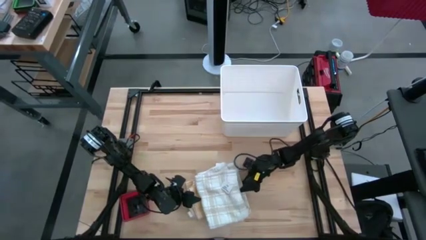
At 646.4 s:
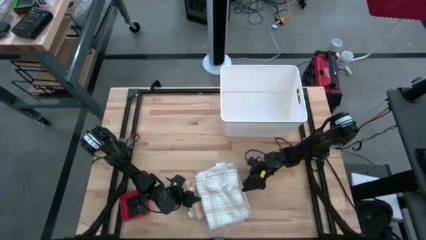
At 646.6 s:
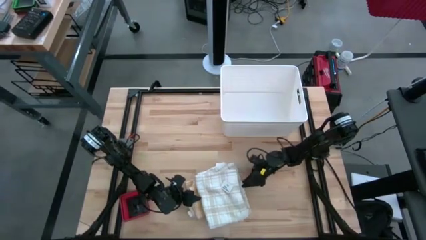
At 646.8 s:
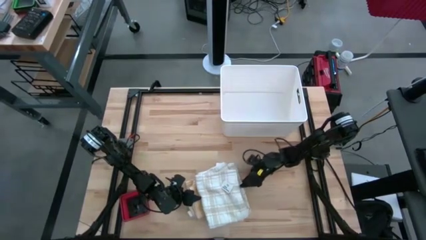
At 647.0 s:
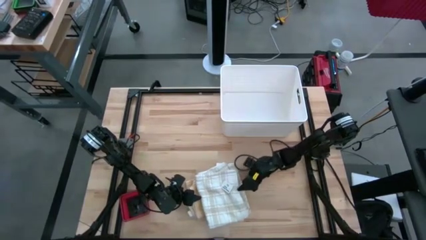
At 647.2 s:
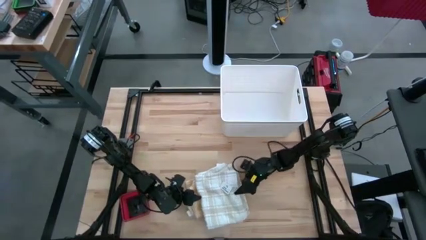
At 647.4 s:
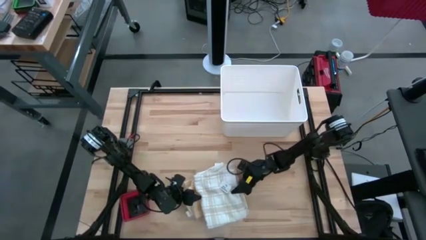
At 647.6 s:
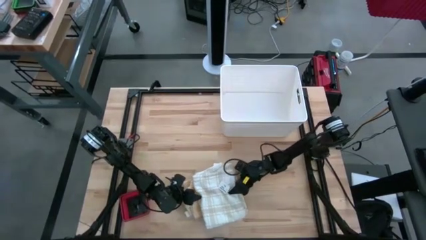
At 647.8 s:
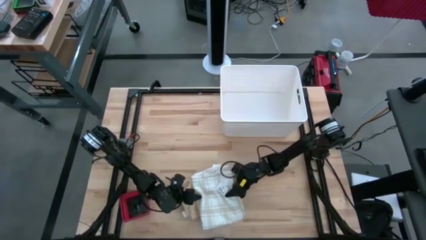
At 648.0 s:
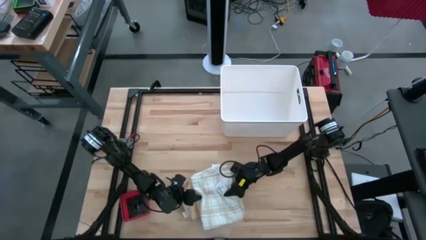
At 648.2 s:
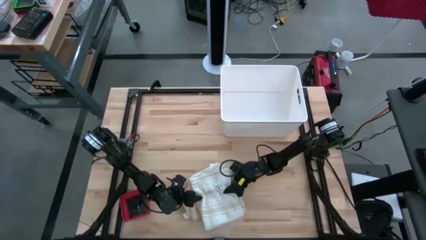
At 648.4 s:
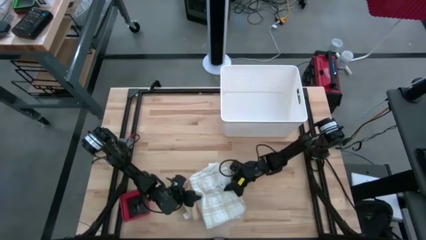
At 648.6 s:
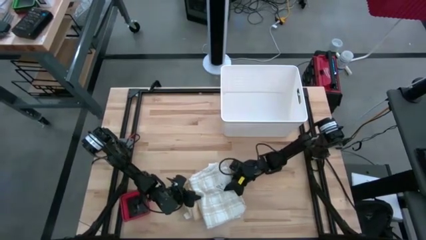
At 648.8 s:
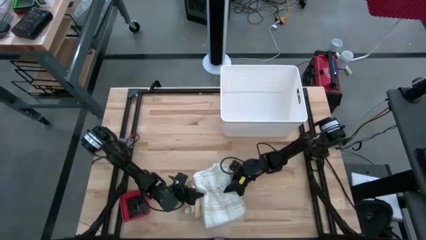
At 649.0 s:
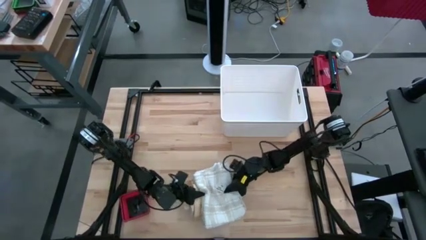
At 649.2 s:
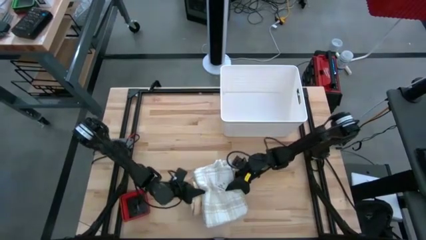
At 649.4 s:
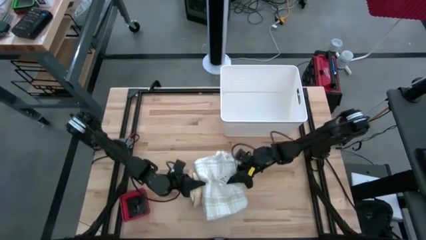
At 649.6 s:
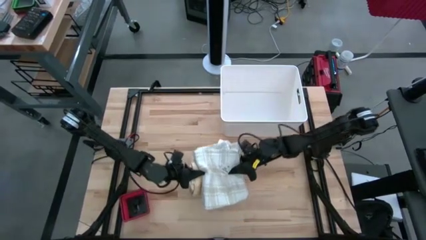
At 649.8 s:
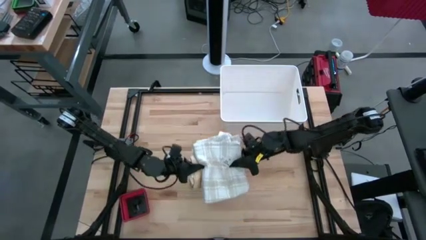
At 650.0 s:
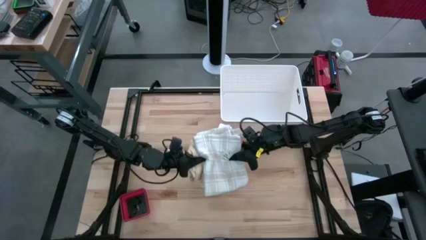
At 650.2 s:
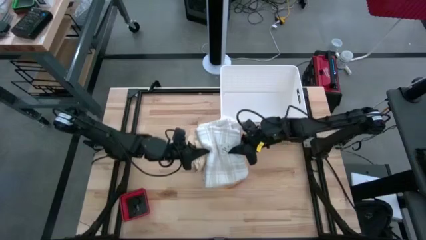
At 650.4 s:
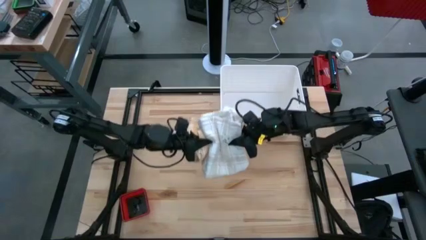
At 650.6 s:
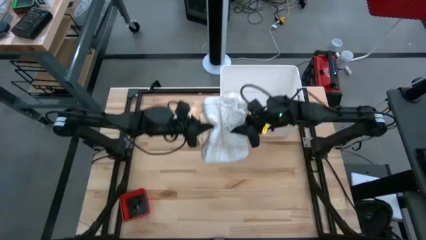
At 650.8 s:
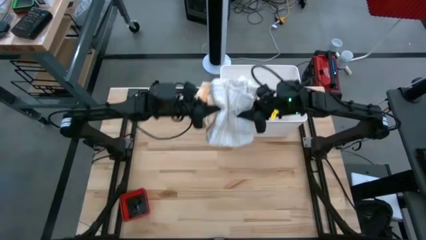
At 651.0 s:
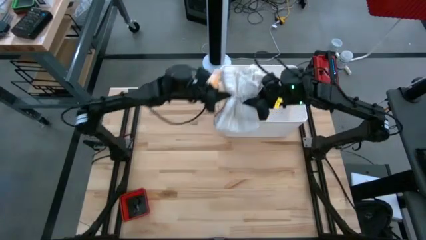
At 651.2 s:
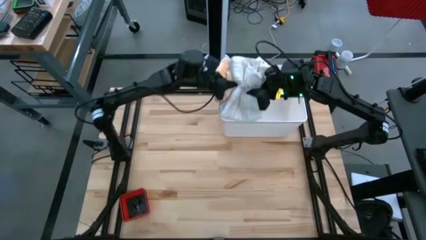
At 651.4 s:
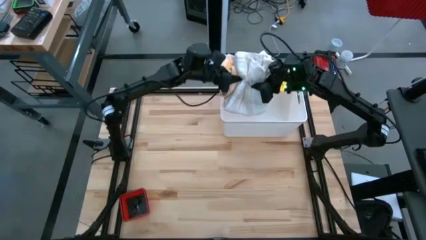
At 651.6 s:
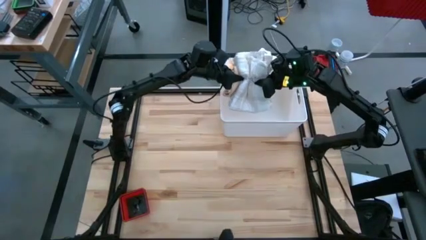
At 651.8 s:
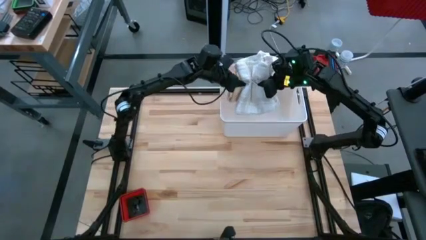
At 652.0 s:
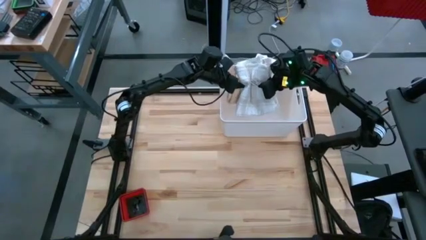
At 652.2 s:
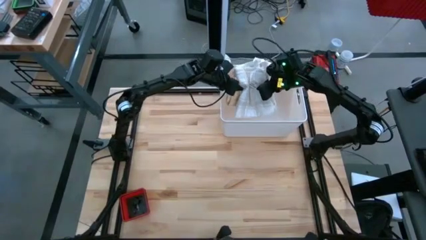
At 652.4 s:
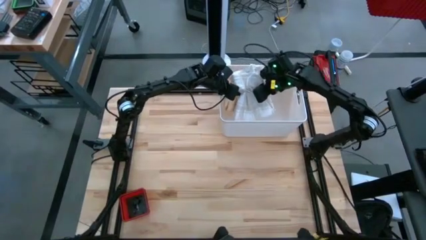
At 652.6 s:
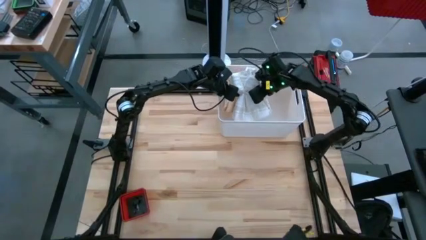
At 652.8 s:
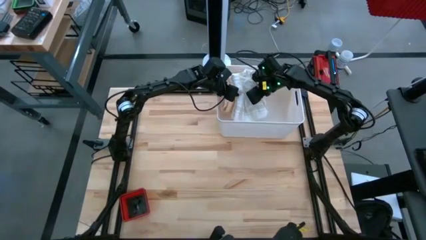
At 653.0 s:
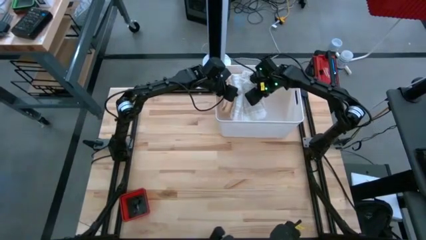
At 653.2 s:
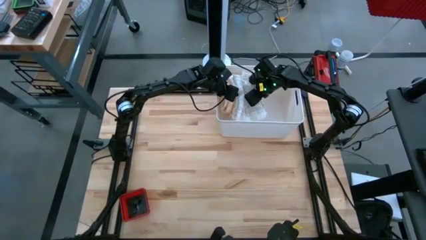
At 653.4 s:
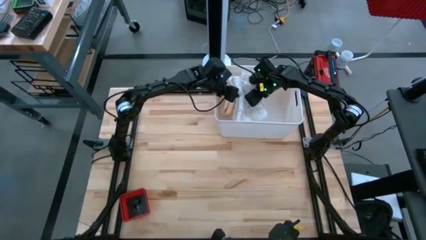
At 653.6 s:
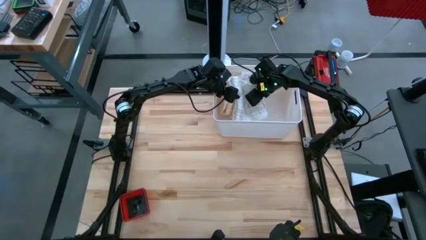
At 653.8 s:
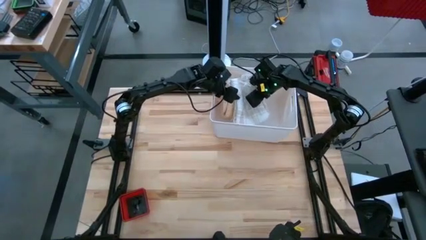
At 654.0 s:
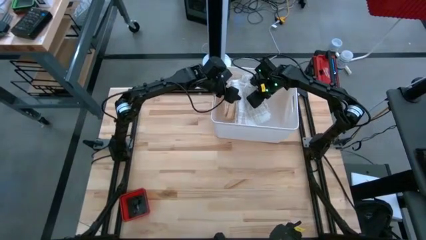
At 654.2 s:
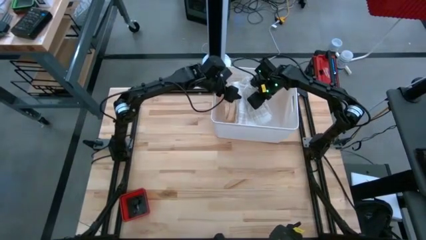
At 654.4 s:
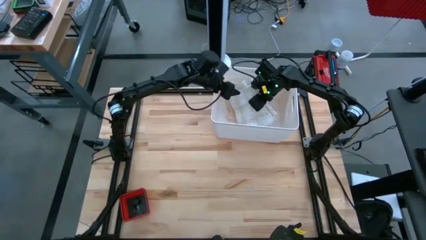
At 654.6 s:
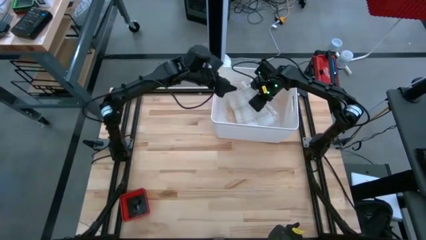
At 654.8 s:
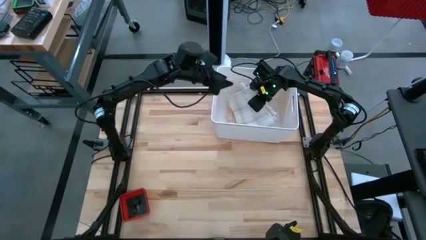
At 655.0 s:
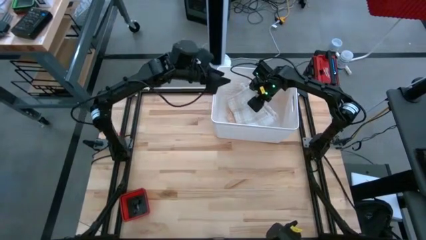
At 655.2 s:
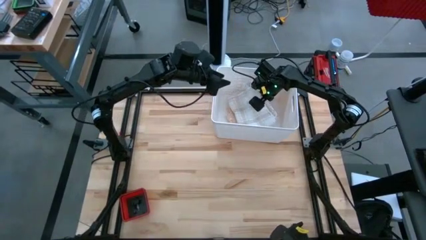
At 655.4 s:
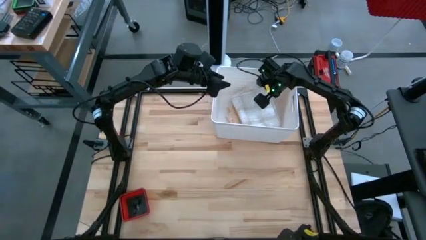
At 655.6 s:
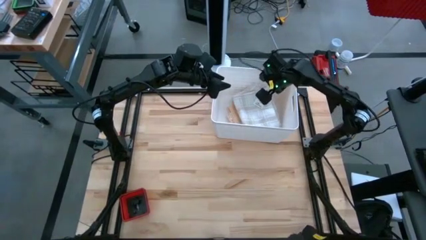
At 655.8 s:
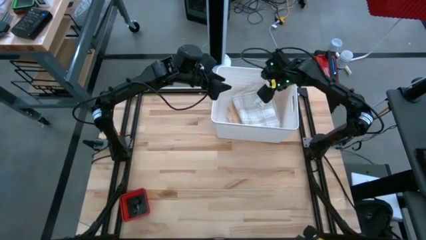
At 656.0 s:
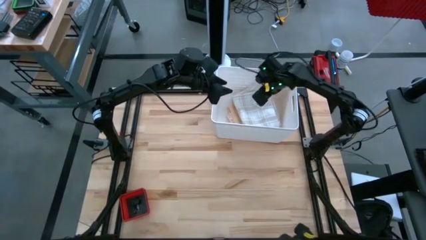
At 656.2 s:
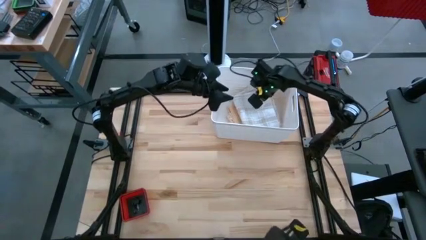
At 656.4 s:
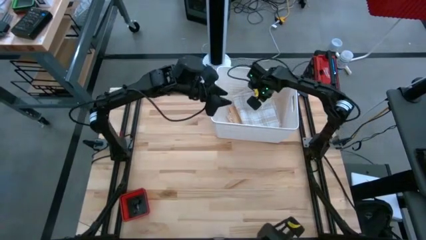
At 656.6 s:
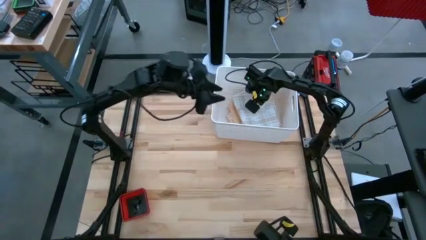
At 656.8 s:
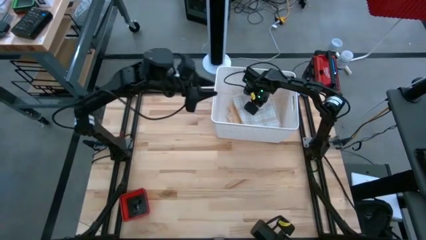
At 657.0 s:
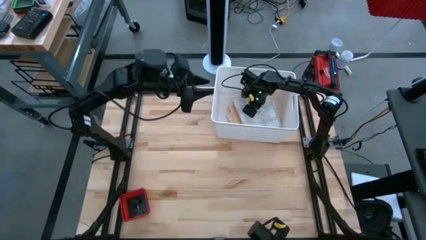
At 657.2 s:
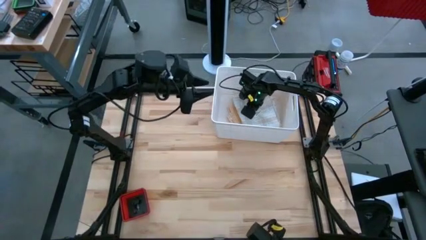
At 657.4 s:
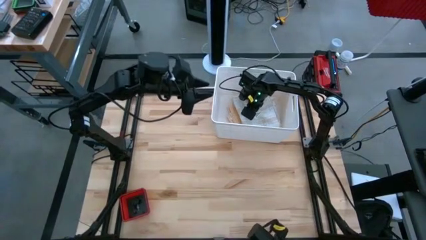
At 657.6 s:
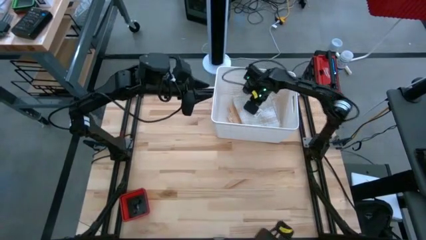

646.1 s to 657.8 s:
Task: Fold towel
Put the stack of folded kitchen towels into the white laundry bin

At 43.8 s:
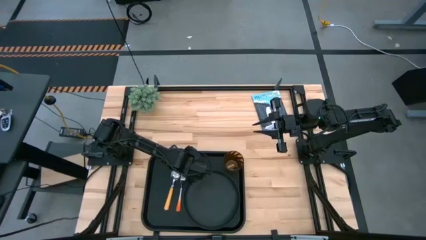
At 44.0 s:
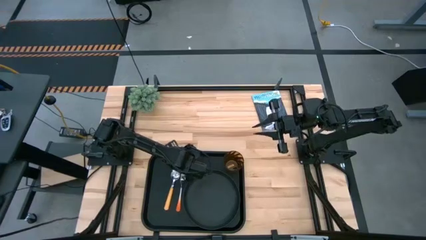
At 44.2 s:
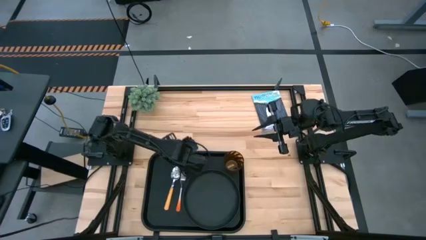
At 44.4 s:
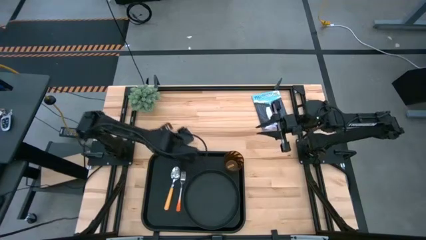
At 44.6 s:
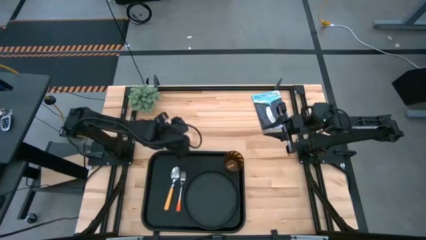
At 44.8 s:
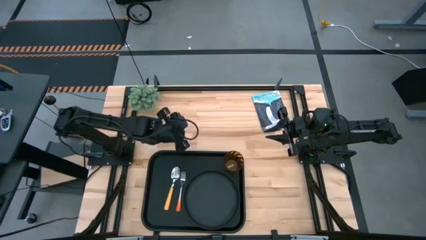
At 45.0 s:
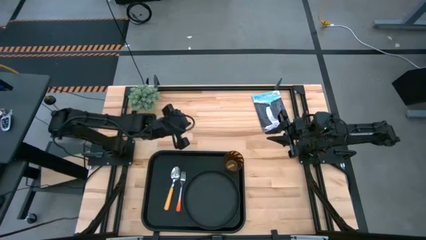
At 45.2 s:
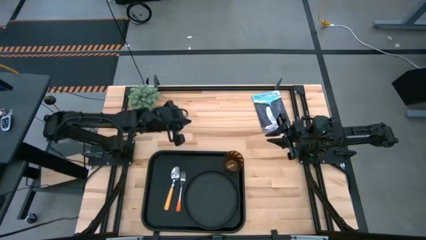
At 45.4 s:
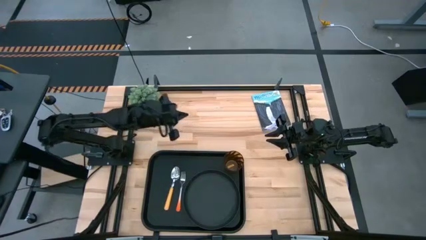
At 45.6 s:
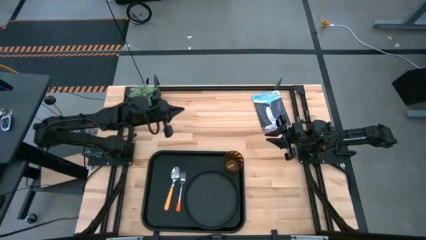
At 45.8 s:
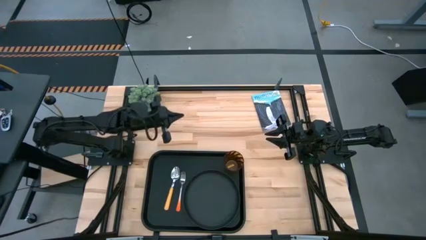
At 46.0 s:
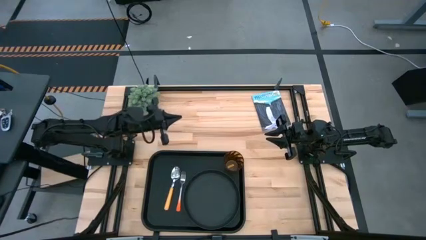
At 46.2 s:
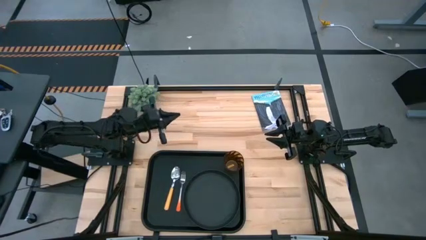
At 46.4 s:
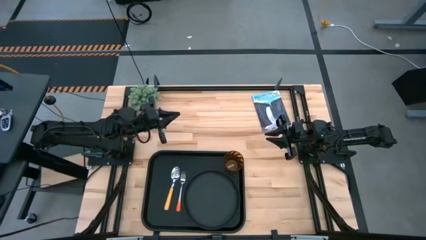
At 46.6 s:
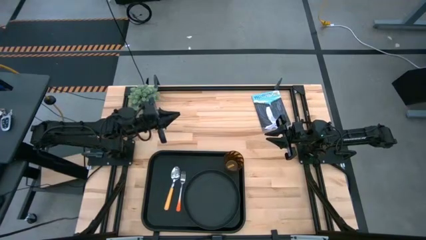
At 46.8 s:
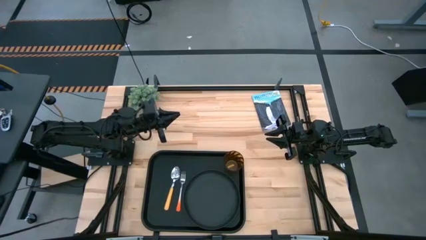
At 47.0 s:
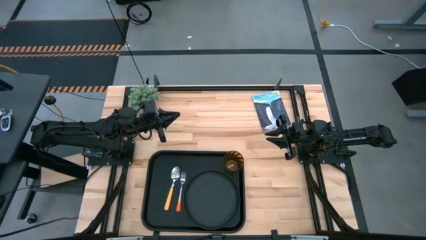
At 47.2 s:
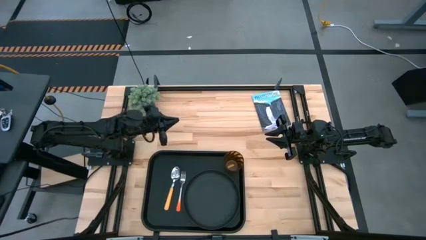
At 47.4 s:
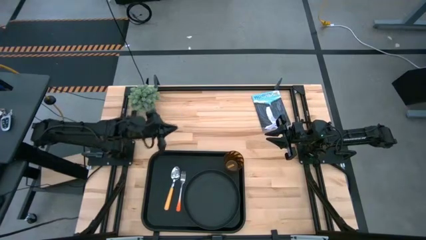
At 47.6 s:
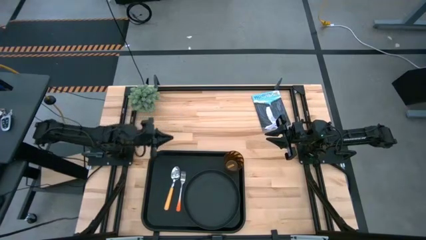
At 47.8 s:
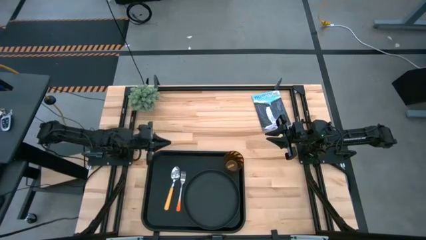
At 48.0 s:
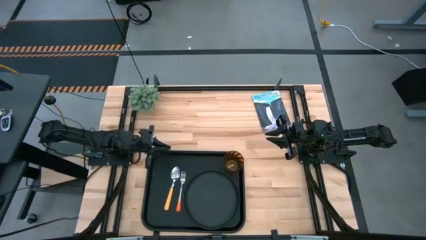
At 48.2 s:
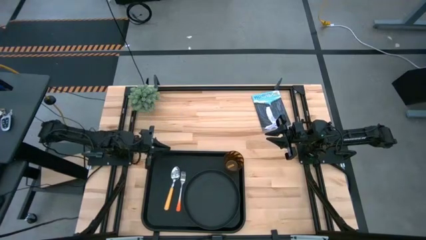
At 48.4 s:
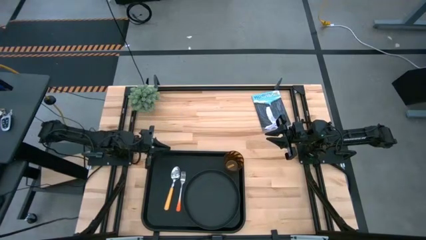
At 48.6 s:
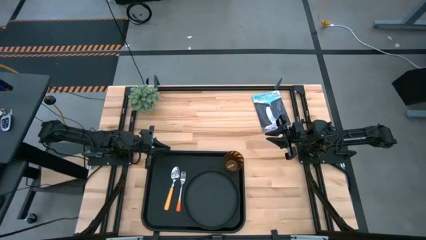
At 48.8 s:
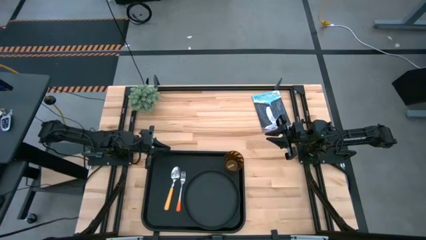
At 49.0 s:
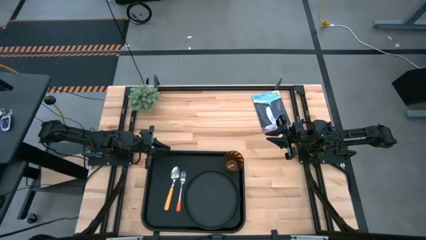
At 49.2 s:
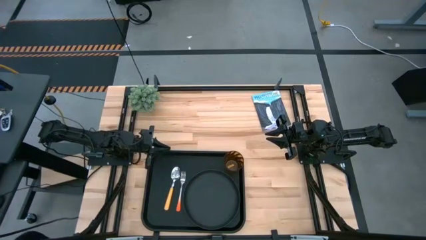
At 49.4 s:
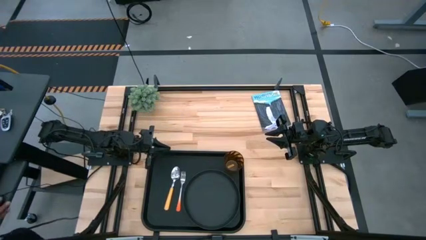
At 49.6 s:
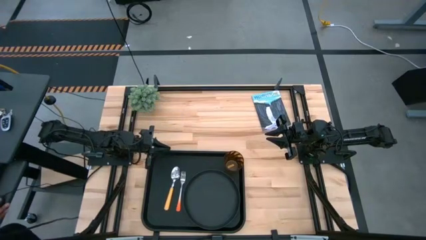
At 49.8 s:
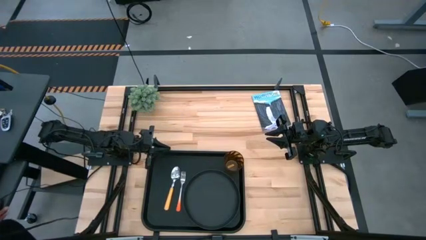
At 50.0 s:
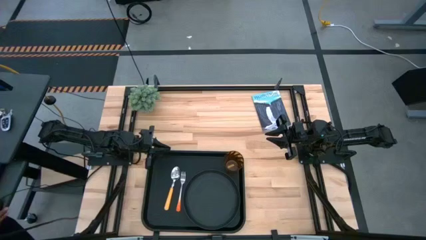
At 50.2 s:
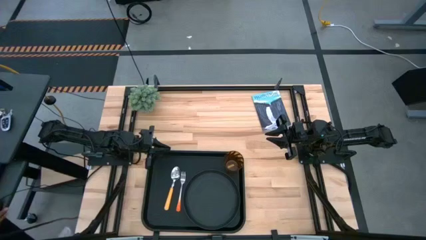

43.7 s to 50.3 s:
Task: Pick and place plate/cup/fork/spoon on tray
Return to Home Position
